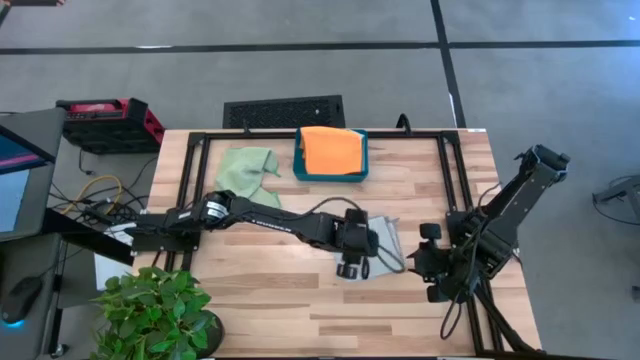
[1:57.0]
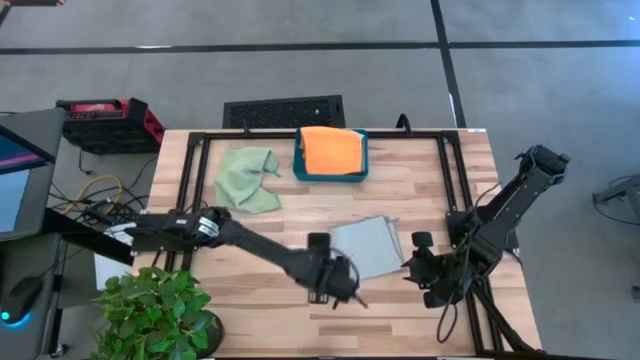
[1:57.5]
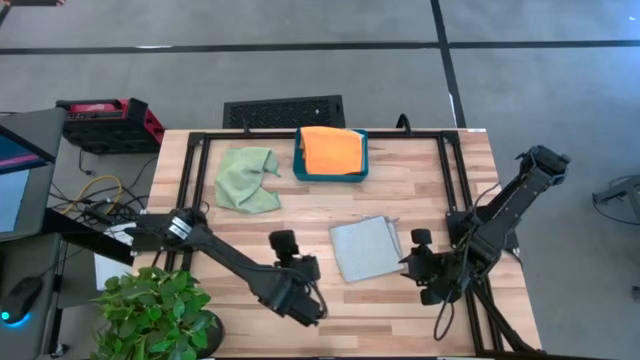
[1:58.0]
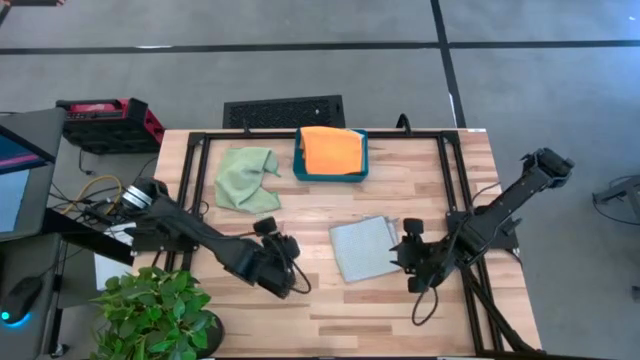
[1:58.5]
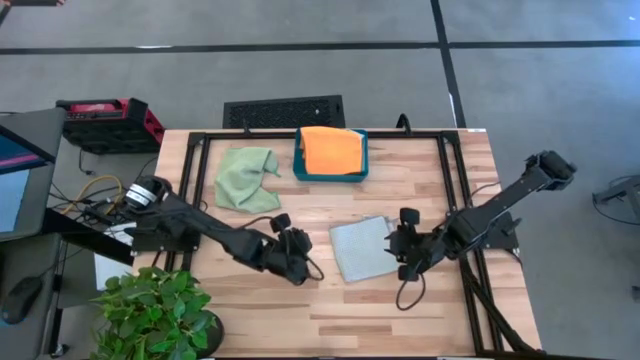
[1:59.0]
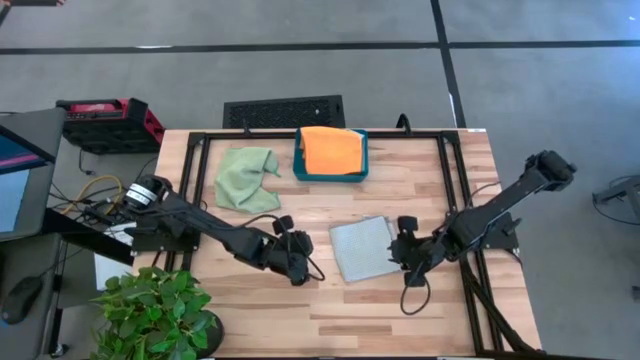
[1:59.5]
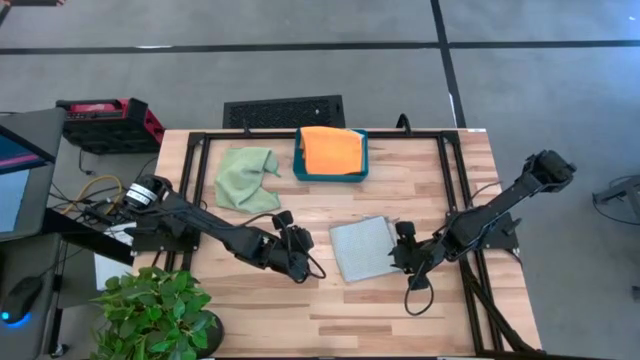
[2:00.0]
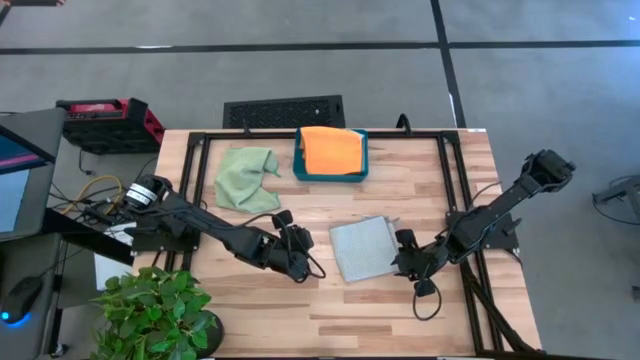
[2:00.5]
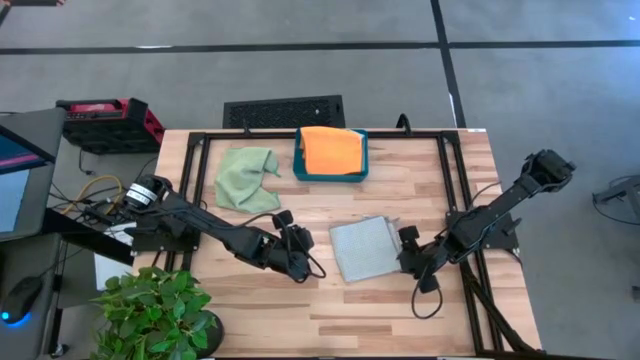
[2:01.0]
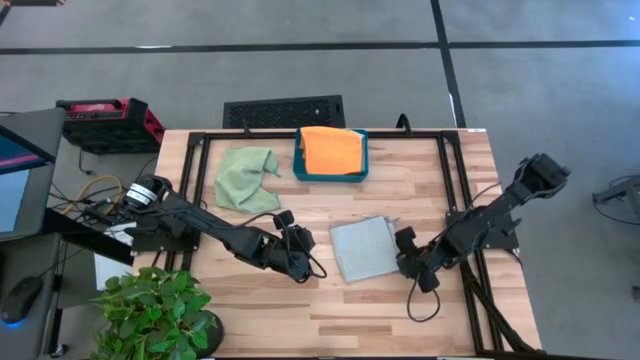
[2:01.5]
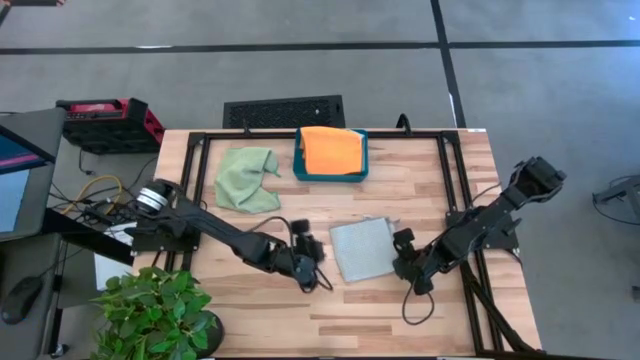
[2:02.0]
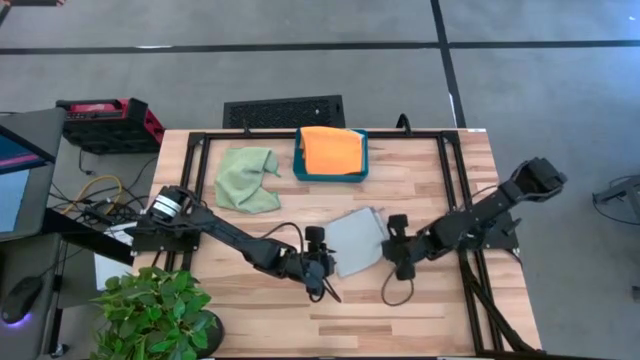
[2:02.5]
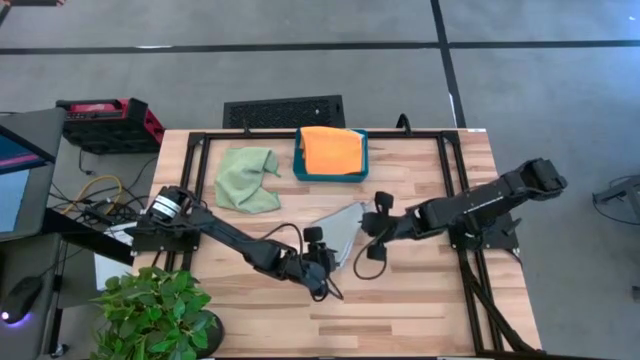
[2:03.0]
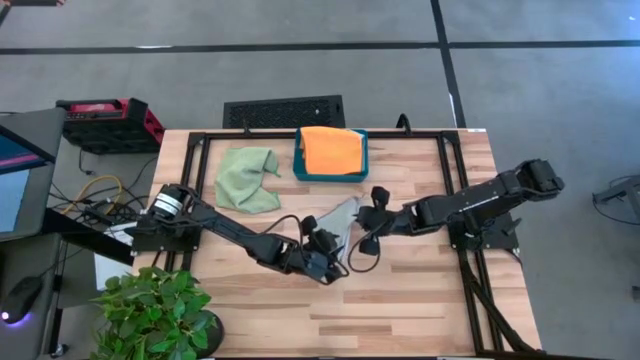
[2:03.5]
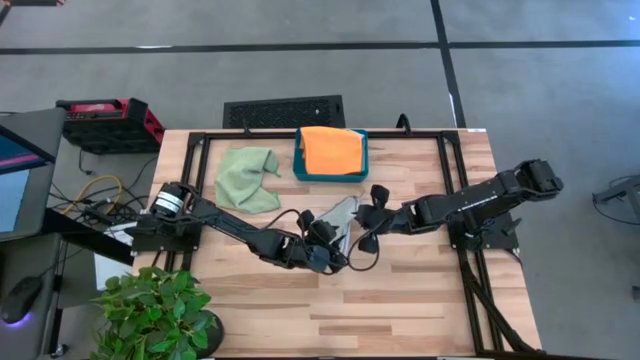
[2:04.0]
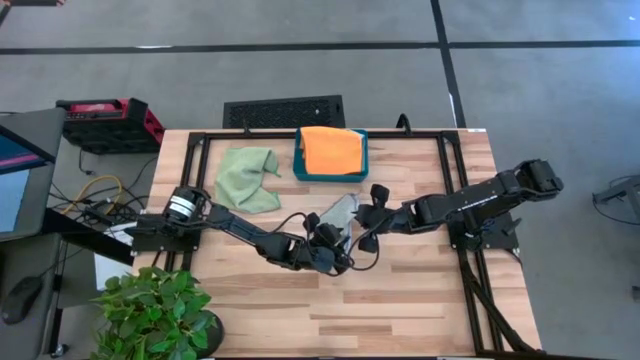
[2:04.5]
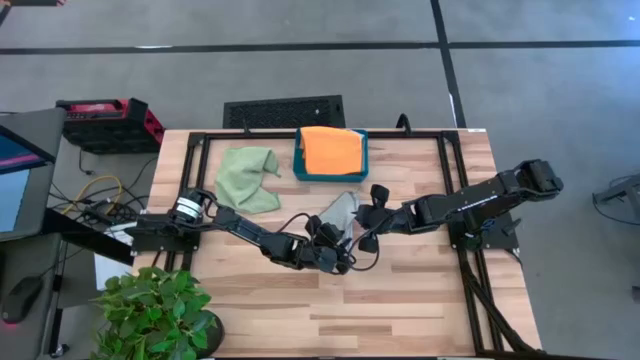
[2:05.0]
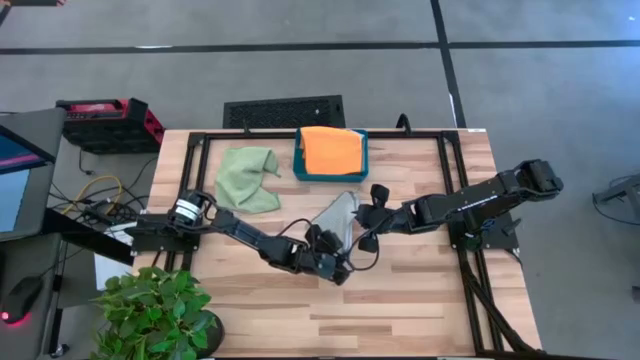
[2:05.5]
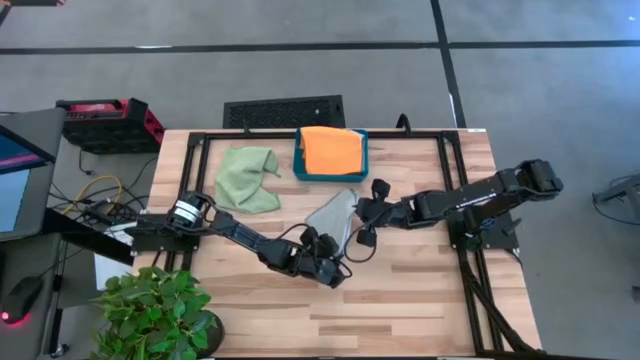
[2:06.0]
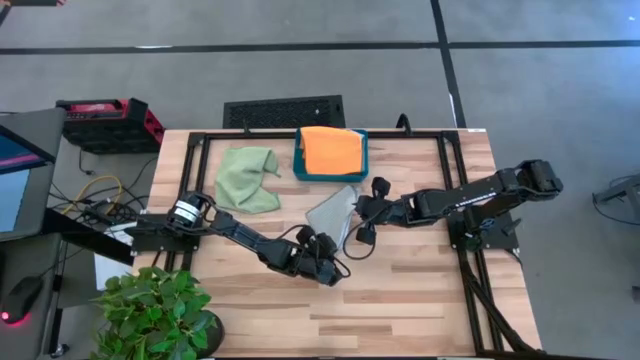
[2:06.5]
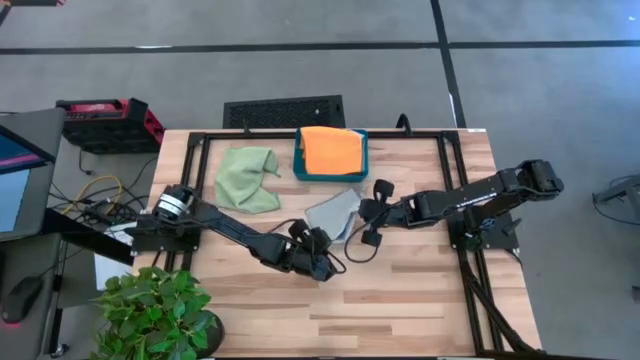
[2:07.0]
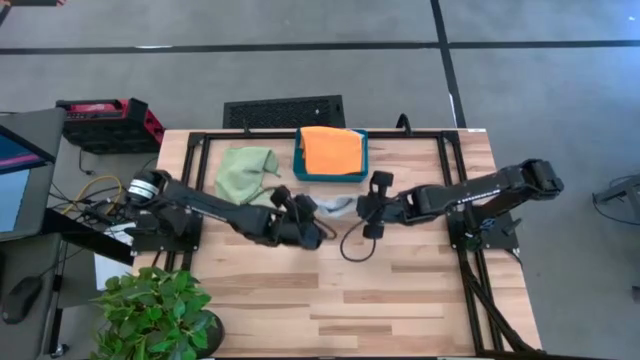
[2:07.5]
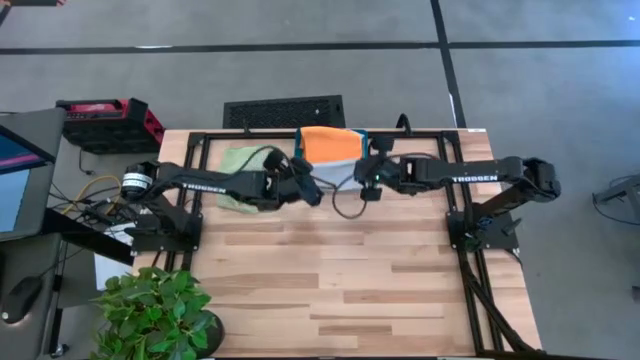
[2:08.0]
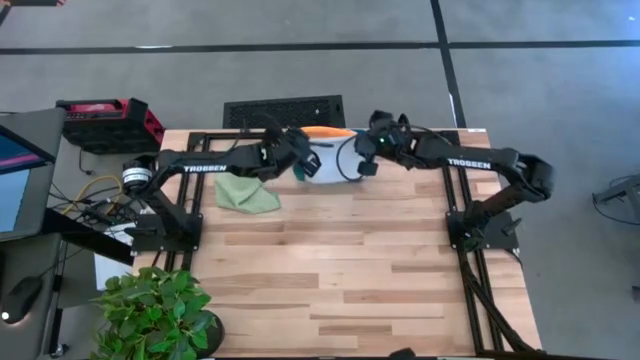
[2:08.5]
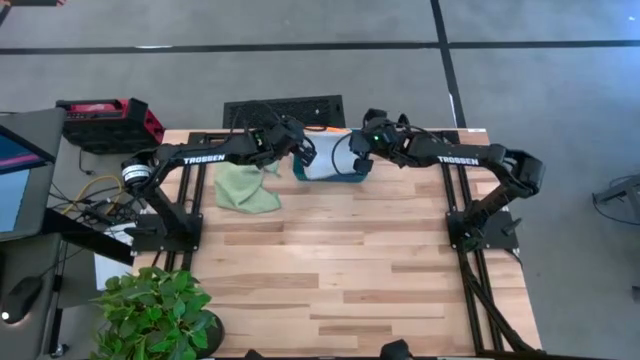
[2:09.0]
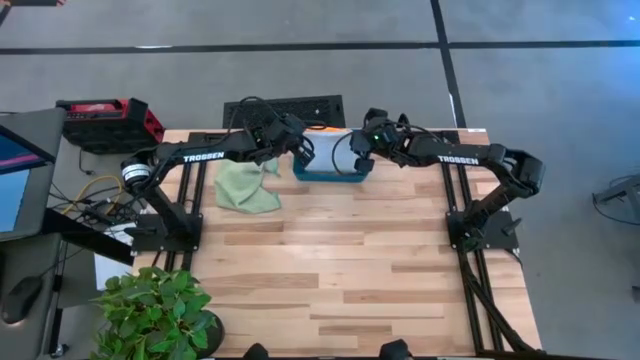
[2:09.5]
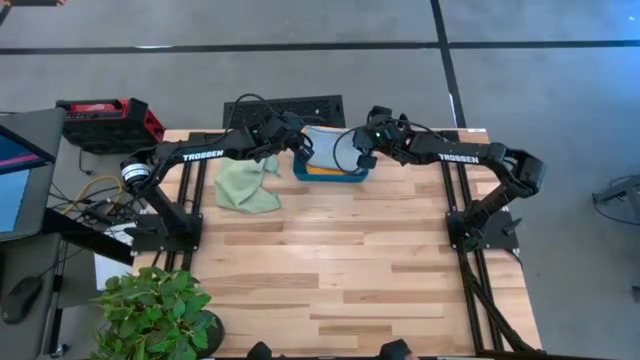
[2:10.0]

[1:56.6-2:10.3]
Task: Fold microfiber towels
Put the folded gray towel into the blue bin

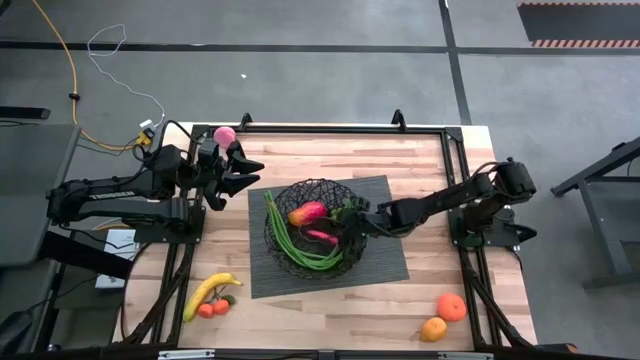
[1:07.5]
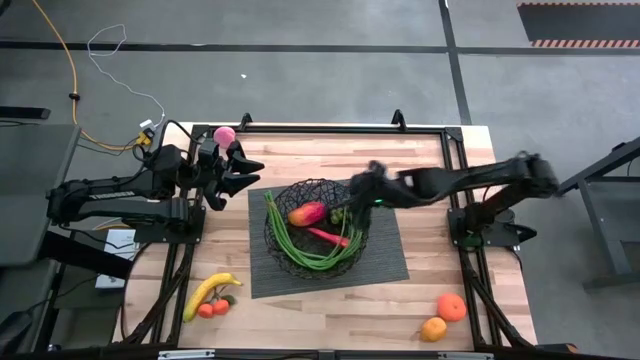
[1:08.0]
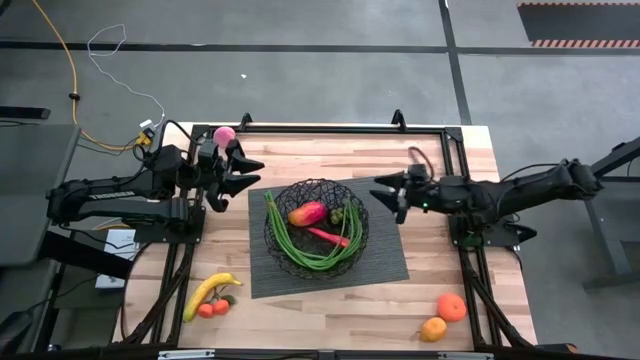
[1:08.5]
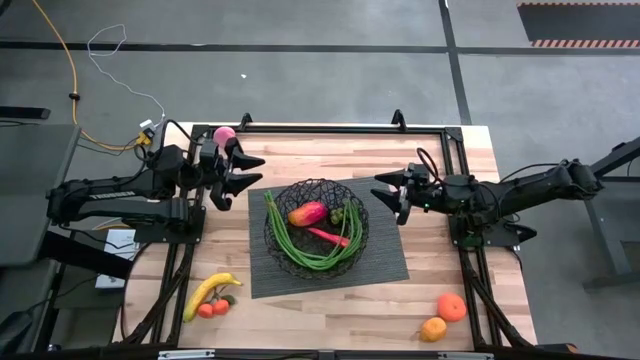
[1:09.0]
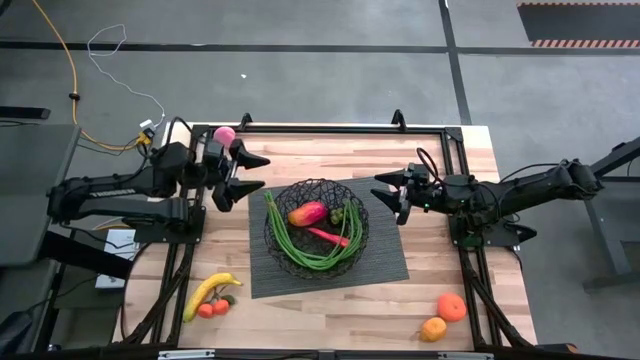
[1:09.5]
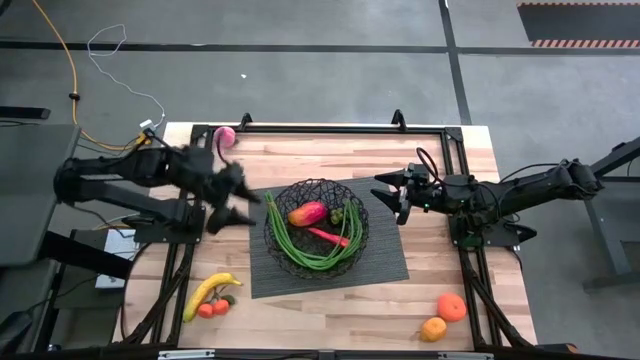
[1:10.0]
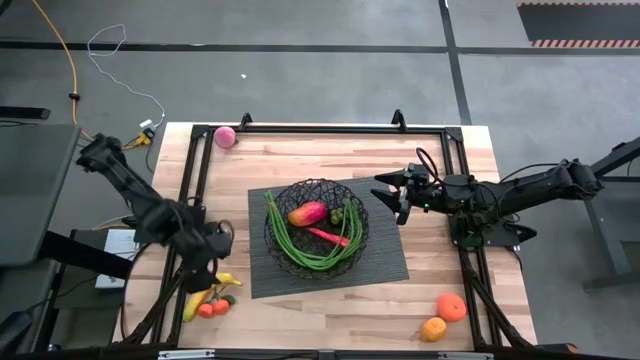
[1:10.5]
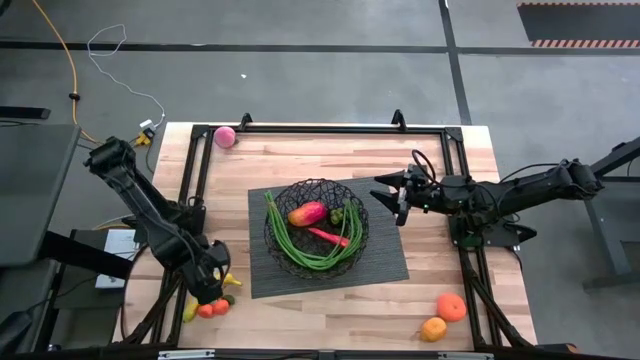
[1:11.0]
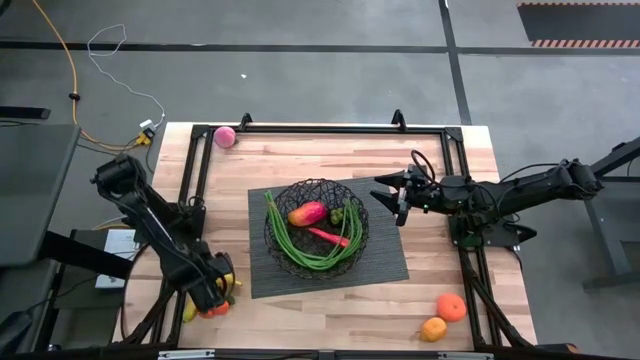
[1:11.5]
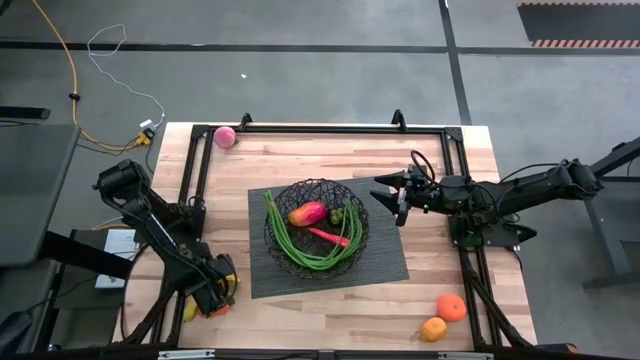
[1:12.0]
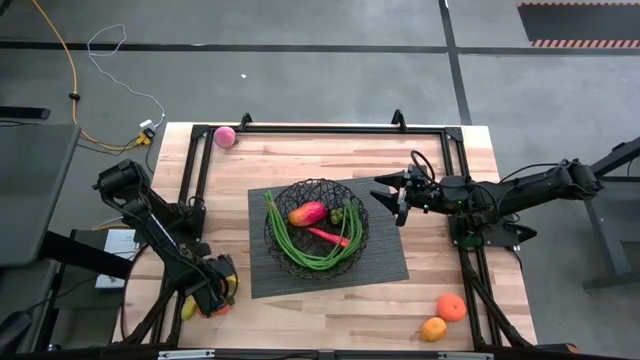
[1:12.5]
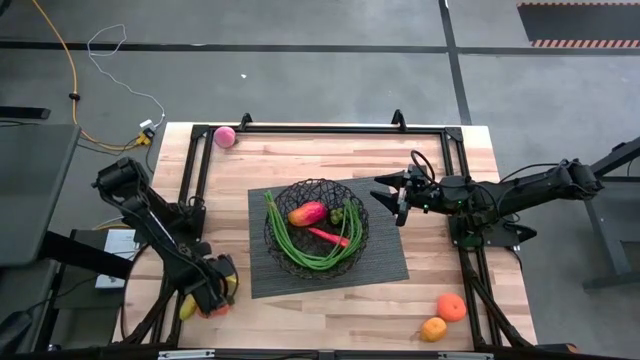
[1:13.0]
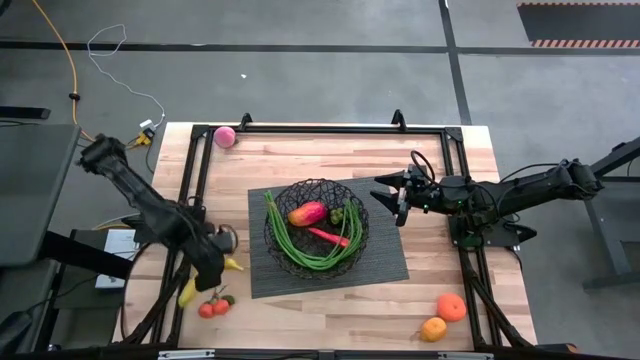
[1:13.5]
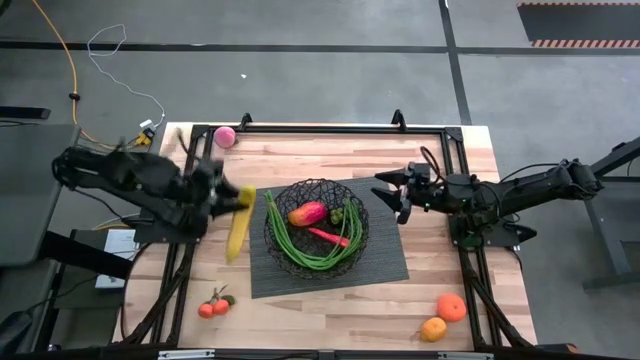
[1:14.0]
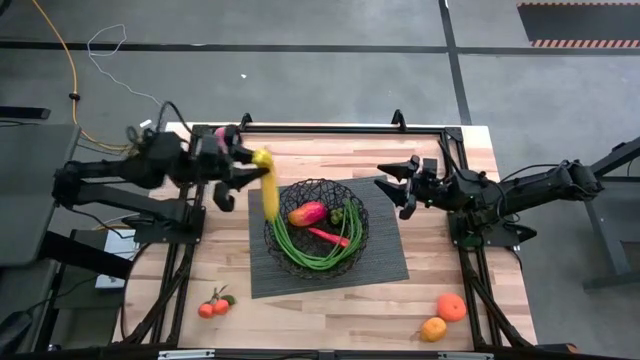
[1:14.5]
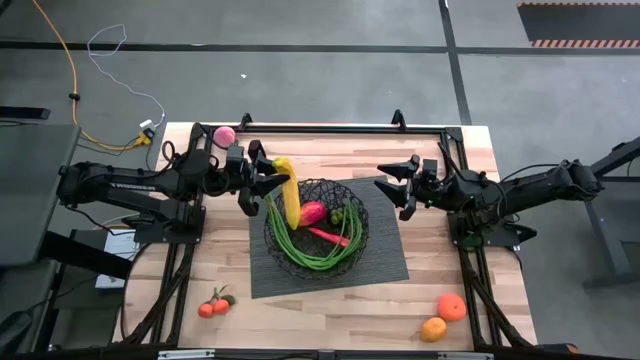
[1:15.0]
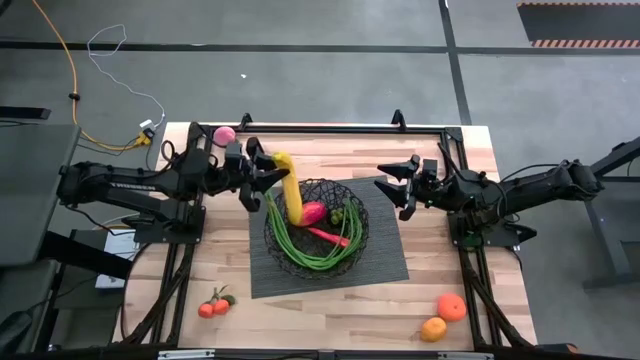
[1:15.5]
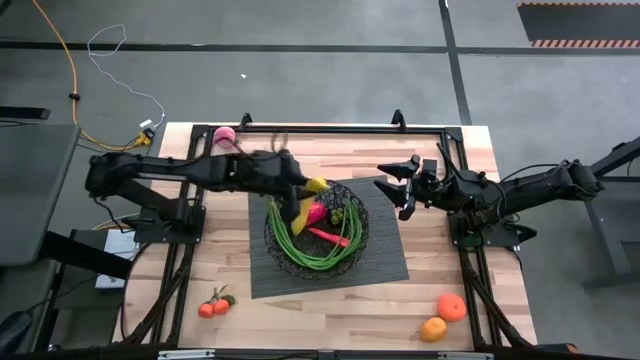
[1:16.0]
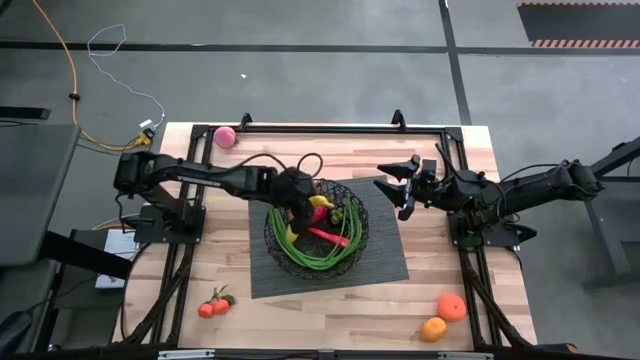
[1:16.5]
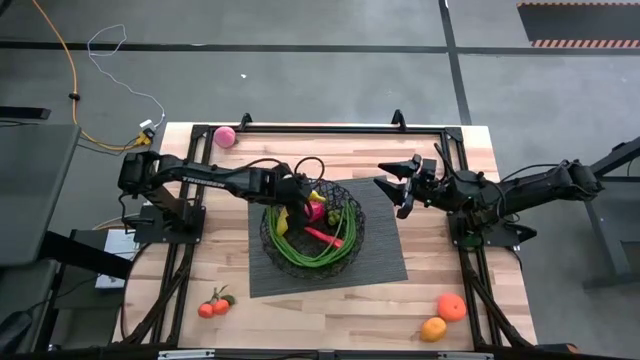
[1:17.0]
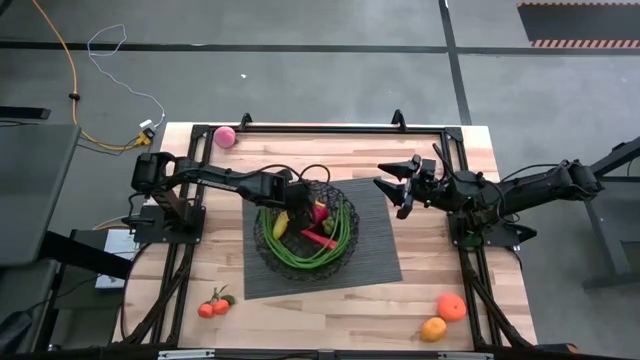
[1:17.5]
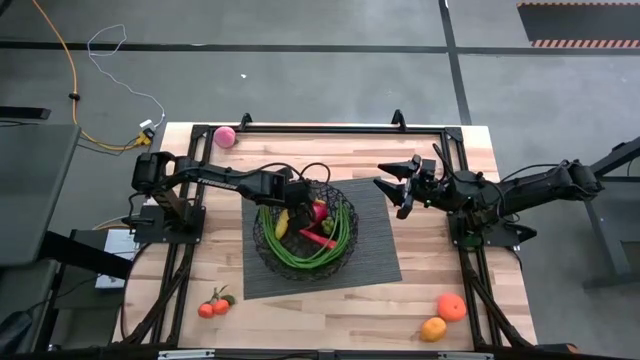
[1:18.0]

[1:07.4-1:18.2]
Task: Build produce basket
Put the yellow banana into the black mesh basket
